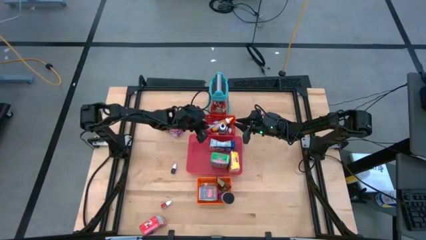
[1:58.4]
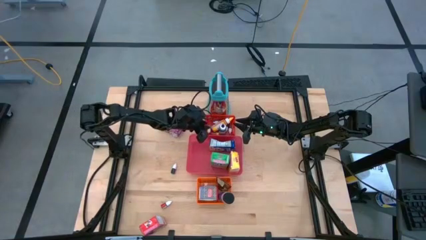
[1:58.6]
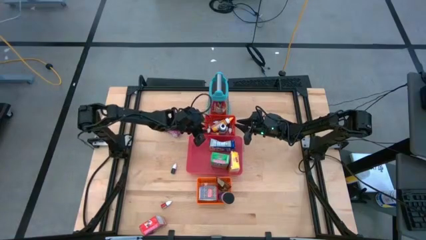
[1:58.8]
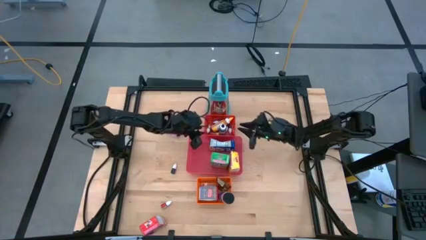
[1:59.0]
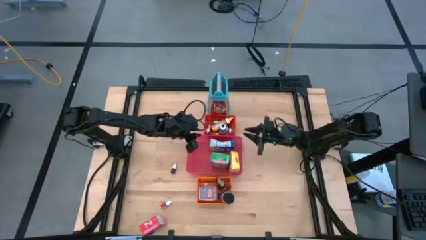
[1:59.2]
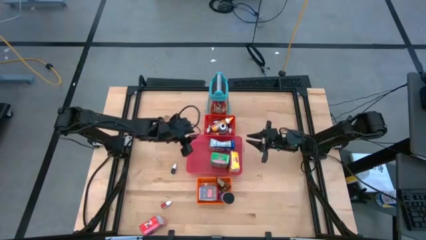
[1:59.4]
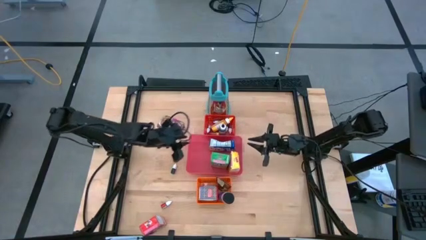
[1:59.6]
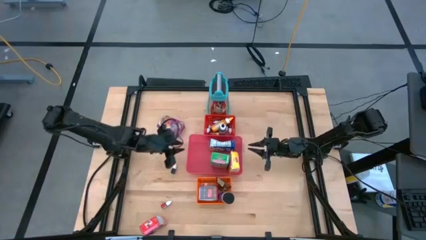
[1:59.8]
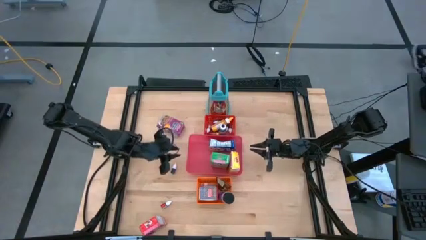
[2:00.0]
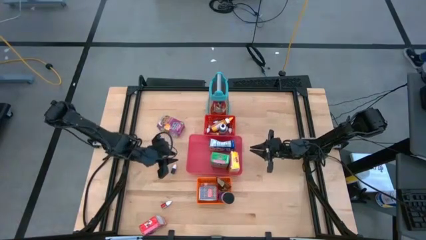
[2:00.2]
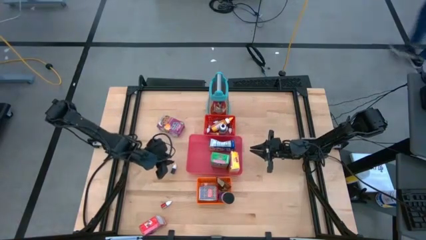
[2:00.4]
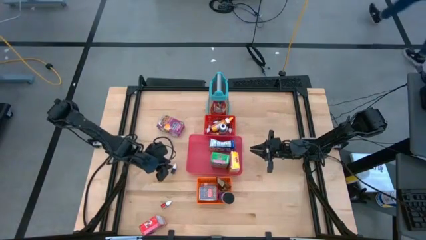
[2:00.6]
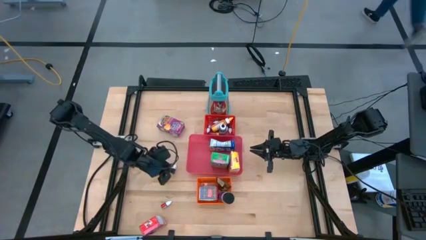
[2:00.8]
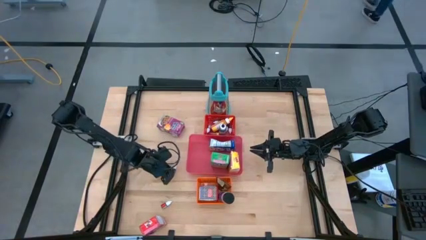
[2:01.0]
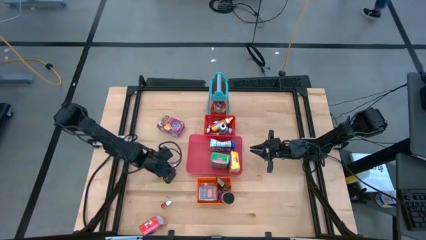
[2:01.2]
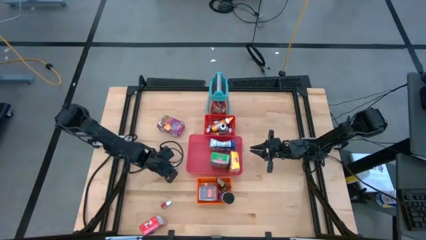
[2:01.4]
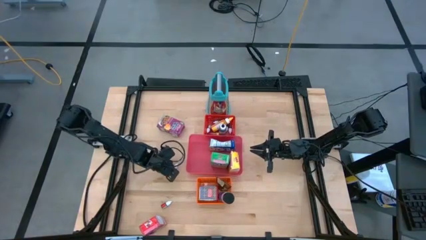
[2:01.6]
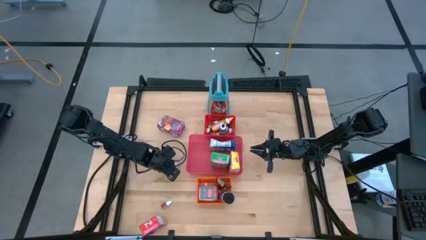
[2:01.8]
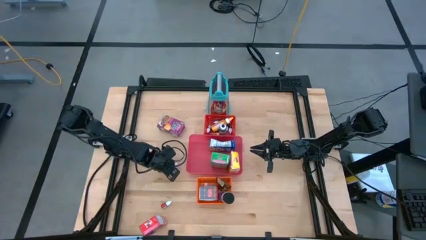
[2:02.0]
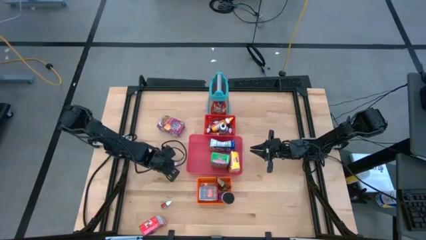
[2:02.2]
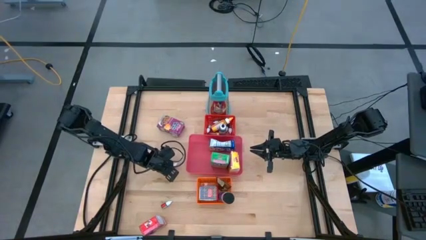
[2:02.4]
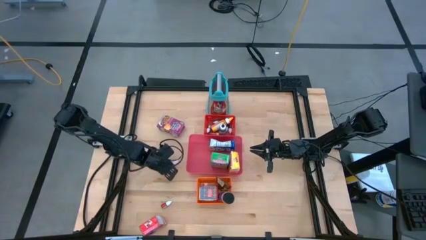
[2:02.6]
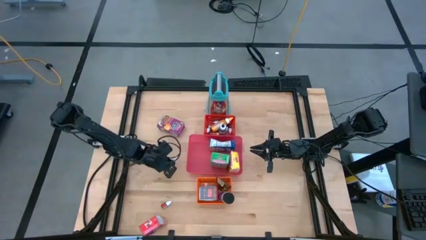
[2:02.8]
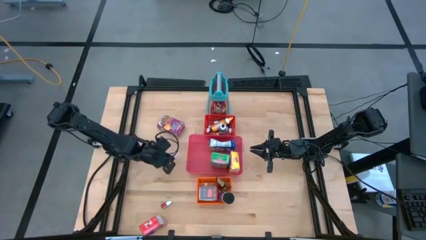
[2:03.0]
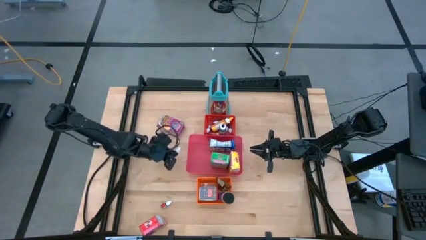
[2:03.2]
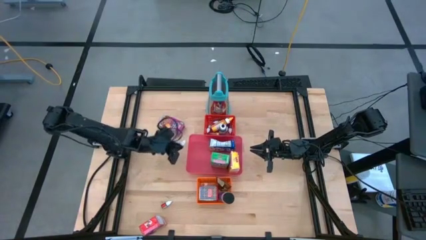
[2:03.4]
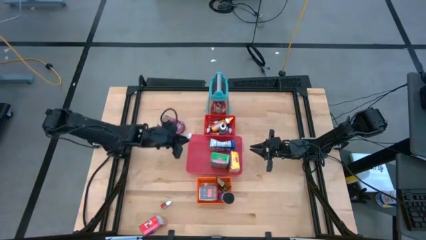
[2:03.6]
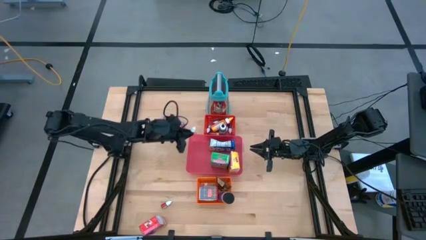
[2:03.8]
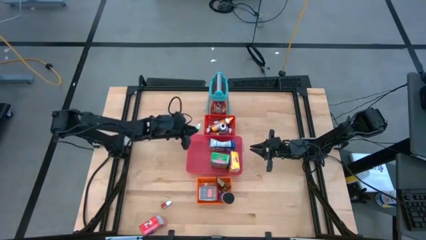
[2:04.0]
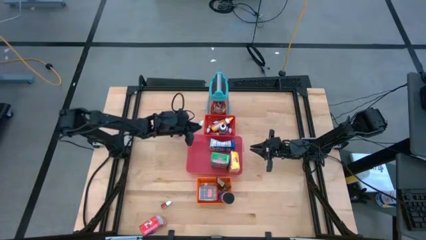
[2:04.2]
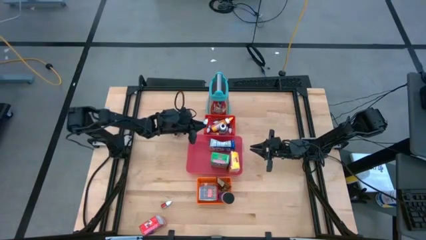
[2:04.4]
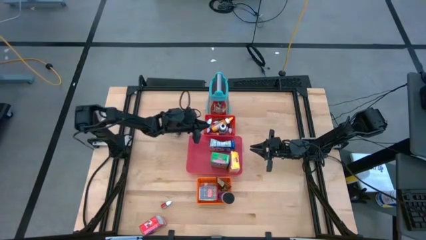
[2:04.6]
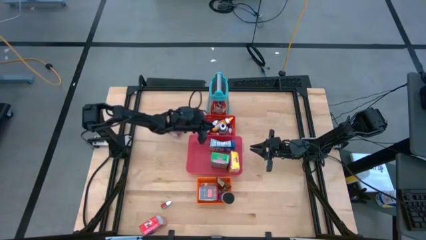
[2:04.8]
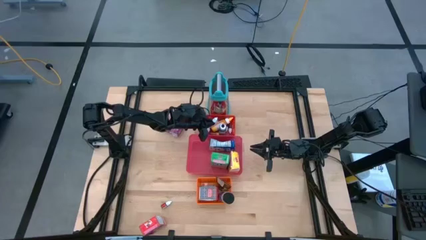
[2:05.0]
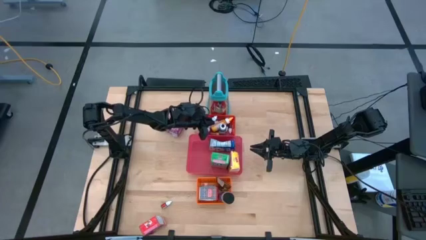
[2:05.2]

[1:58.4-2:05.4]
Task: Pick & Place Kitchen Items
Put the small brown food coloring bottle into the red bin

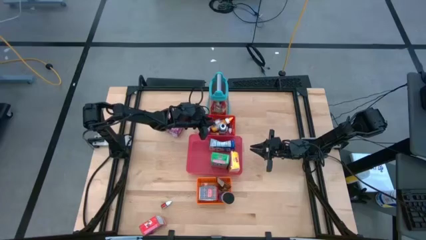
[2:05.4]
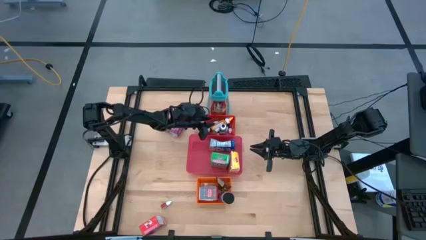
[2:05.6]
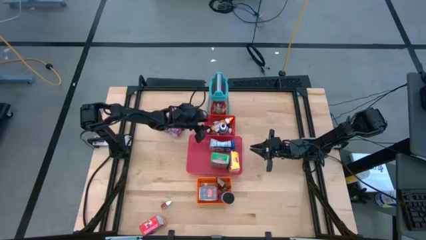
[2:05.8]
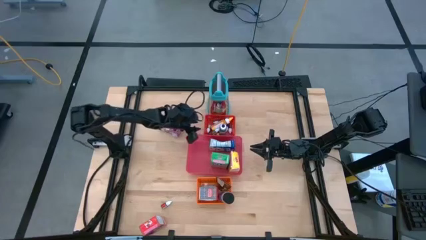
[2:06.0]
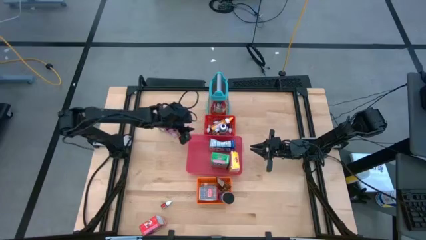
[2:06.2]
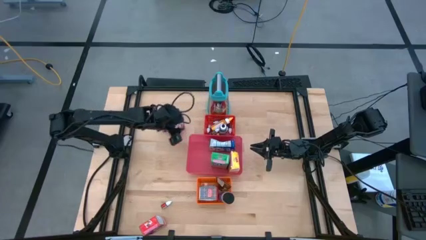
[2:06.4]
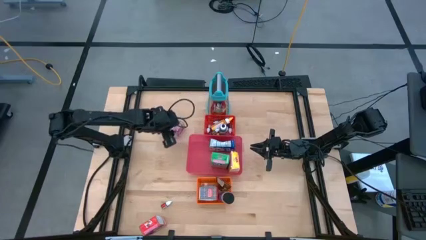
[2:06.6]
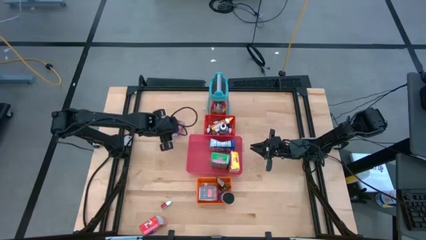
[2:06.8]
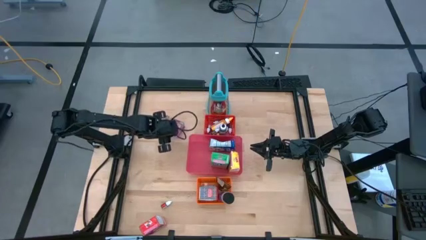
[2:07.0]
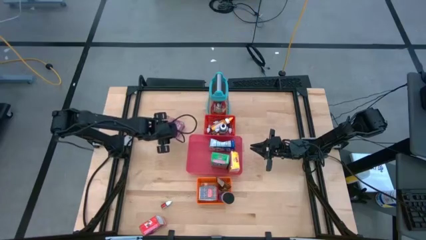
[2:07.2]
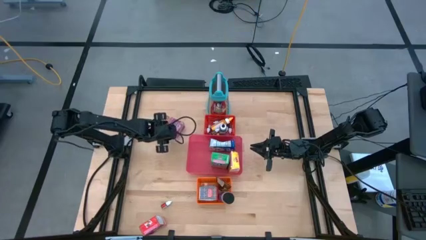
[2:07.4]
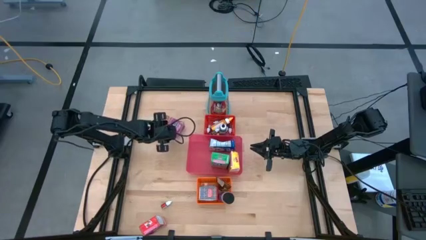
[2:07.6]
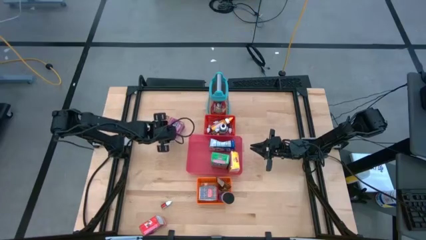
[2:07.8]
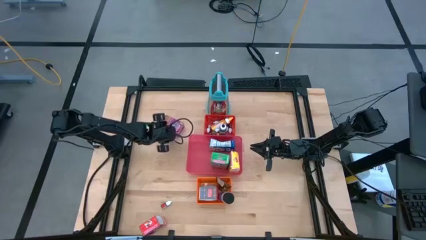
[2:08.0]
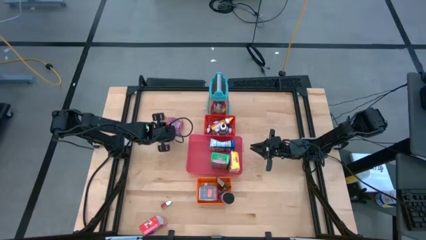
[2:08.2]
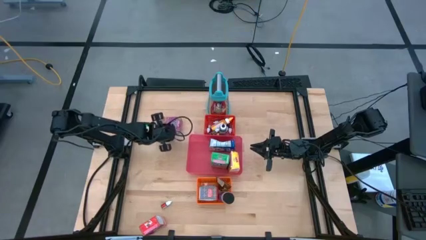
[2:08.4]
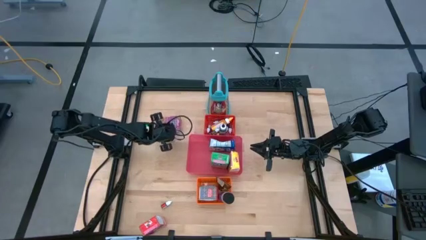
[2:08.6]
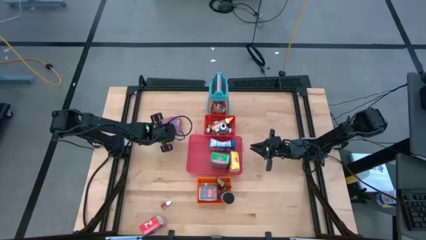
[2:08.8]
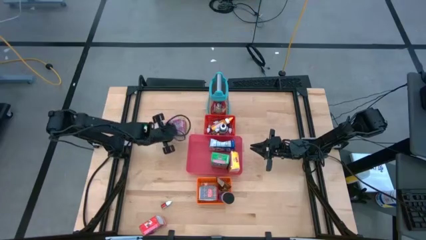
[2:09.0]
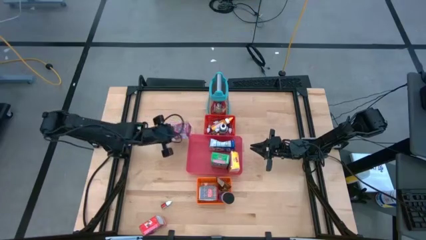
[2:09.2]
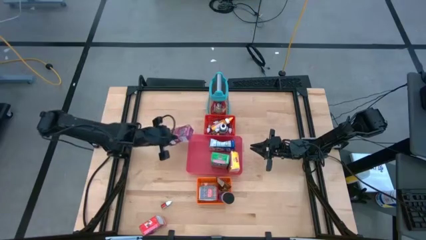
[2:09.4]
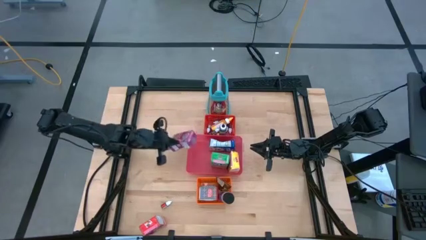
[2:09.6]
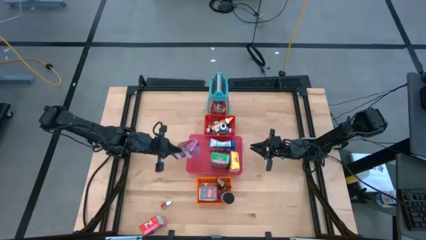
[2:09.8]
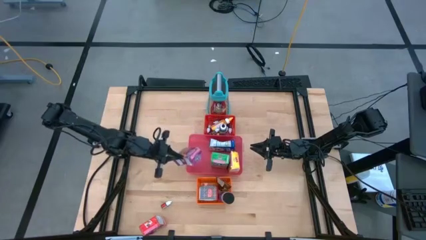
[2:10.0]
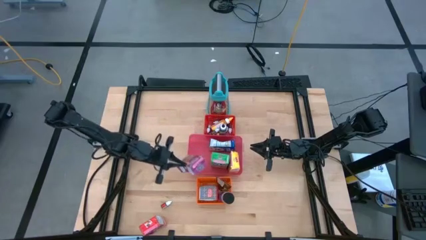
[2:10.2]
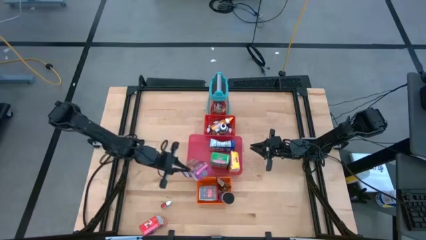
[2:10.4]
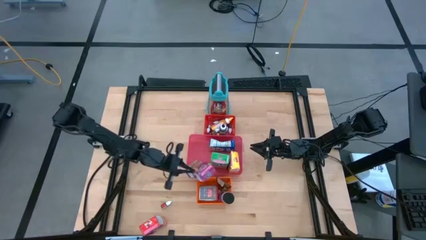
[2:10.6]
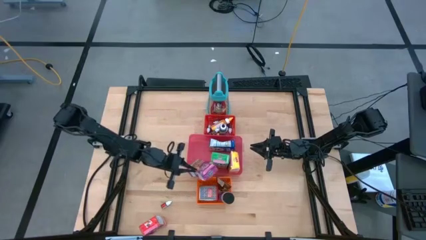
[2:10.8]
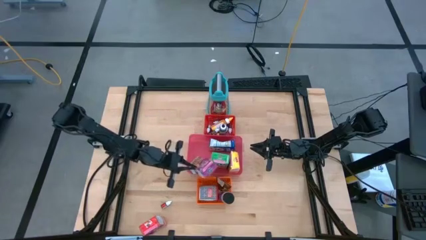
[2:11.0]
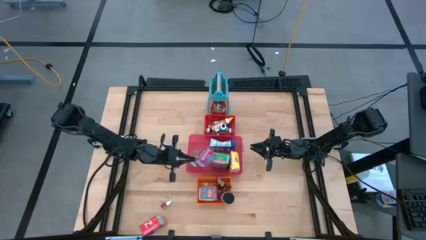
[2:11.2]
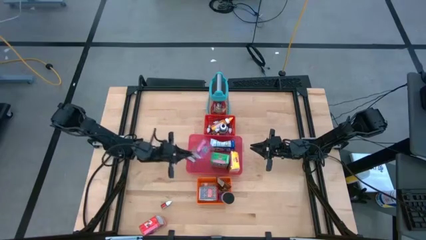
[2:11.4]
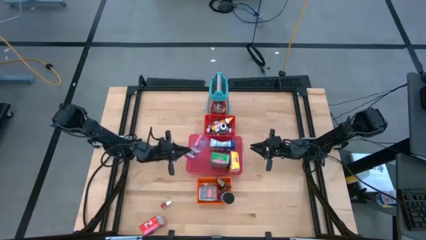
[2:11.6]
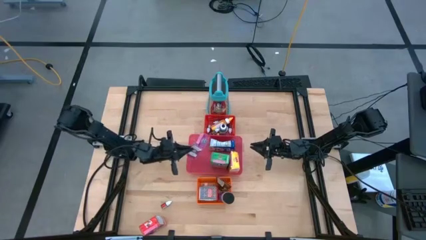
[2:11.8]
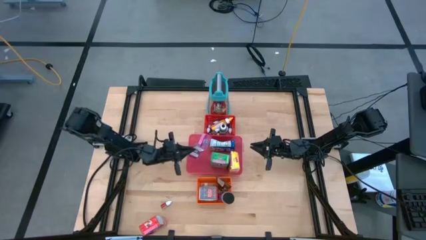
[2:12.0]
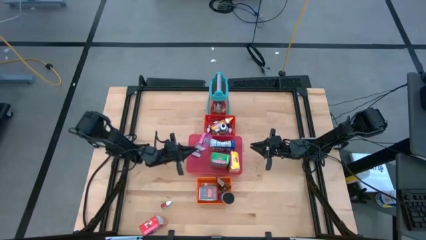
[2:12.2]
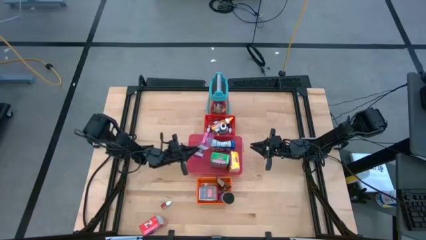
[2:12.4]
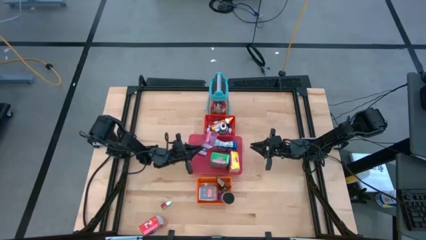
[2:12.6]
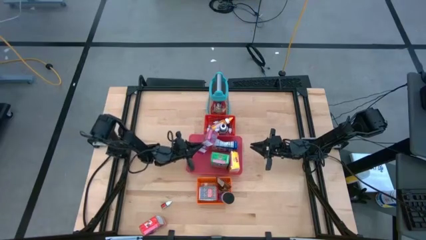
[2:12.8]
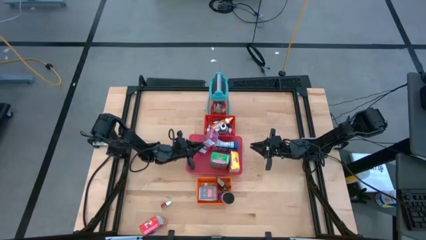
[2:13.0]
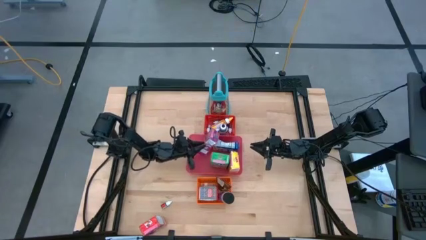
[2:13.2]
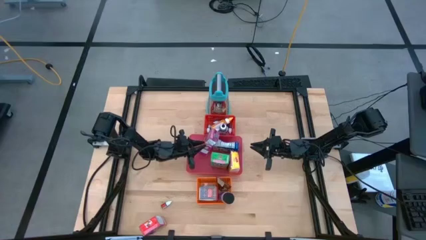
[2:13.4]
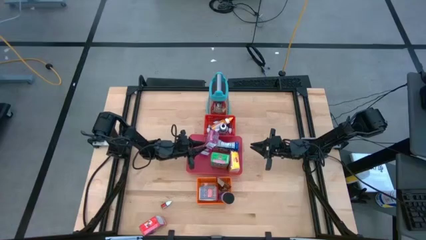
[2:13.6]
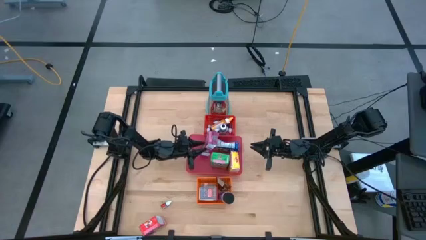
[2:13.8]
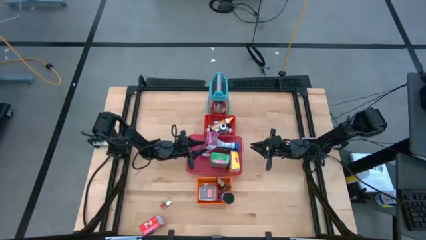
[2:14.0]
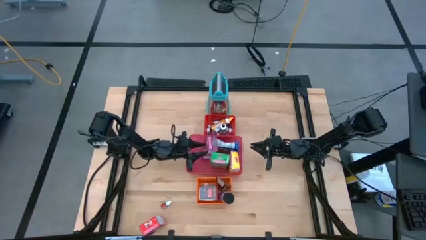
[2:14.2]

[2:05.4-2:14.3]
Put the violet cereal box into the pink bin
